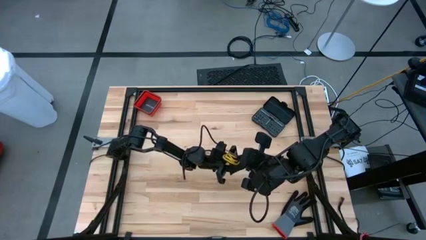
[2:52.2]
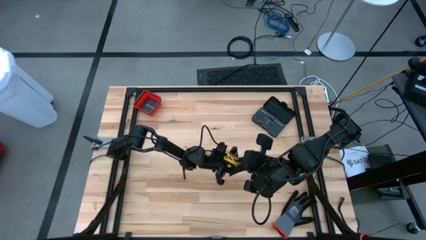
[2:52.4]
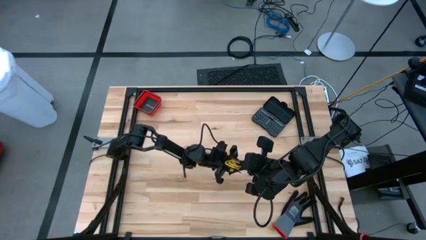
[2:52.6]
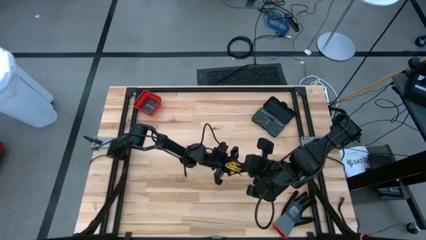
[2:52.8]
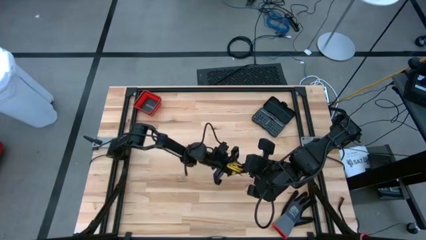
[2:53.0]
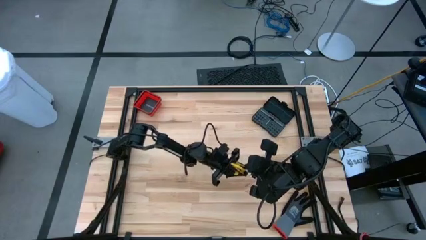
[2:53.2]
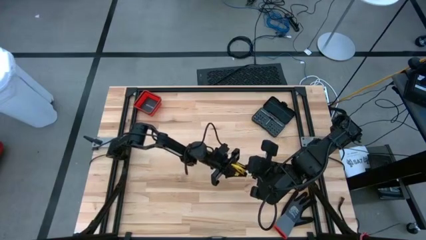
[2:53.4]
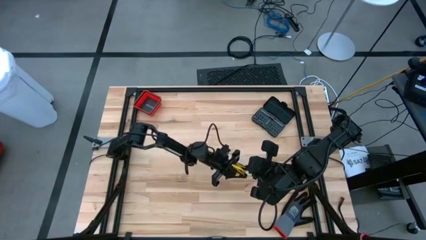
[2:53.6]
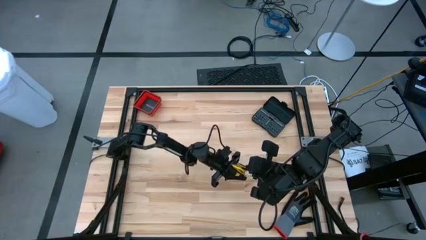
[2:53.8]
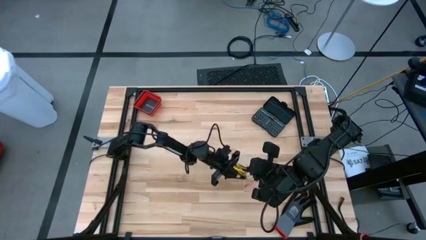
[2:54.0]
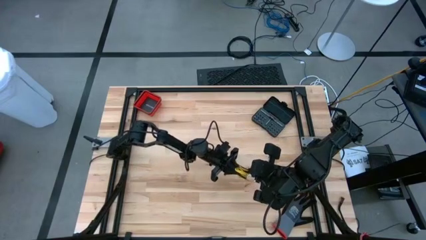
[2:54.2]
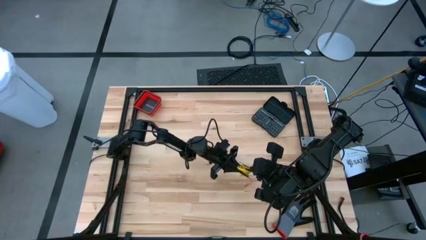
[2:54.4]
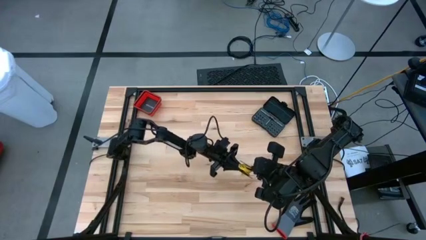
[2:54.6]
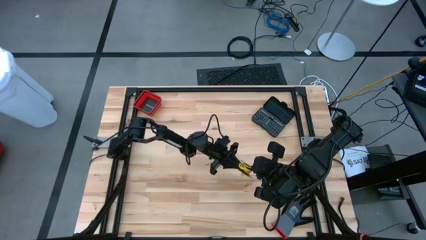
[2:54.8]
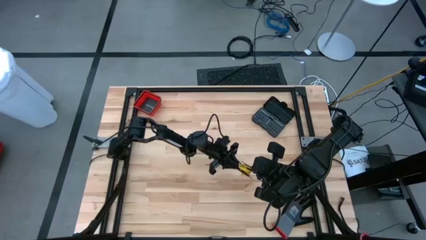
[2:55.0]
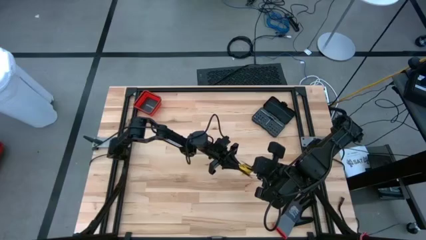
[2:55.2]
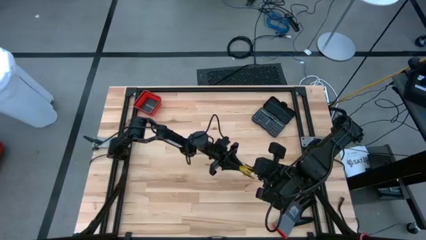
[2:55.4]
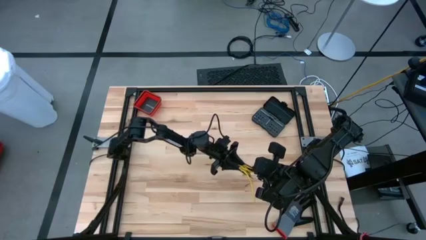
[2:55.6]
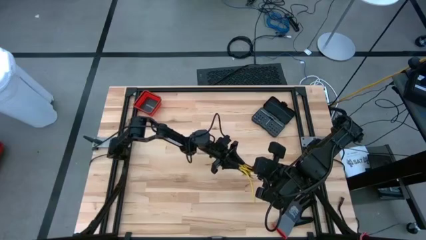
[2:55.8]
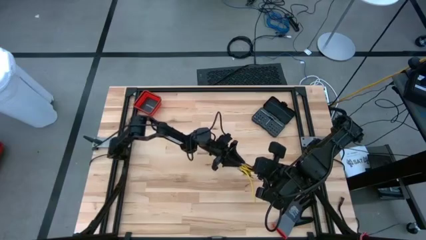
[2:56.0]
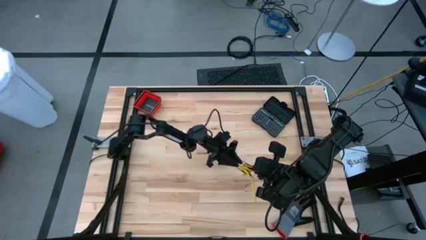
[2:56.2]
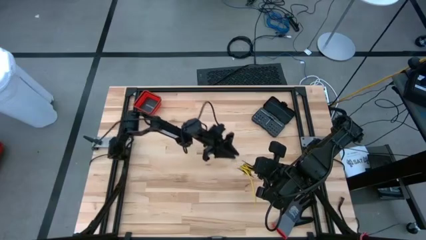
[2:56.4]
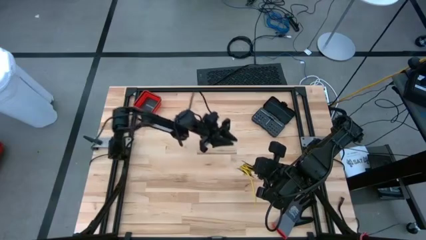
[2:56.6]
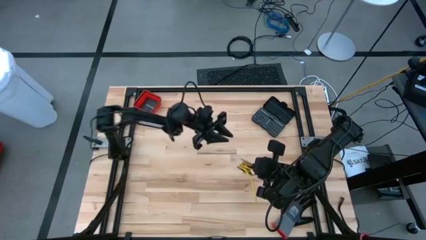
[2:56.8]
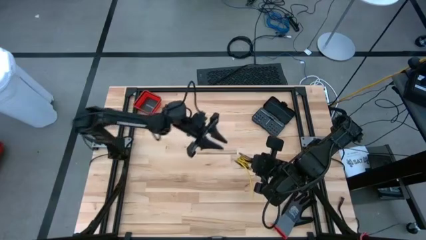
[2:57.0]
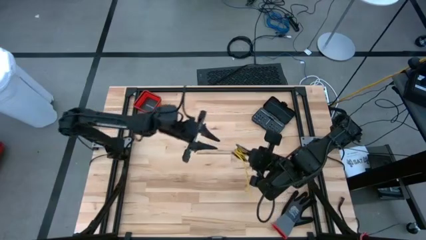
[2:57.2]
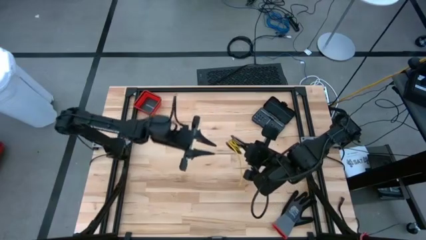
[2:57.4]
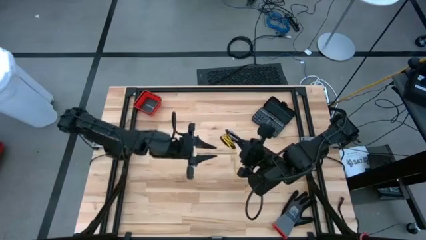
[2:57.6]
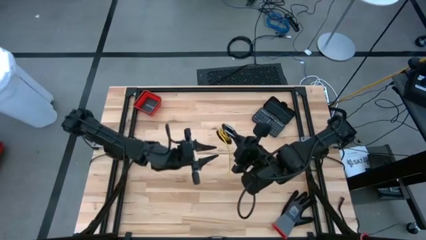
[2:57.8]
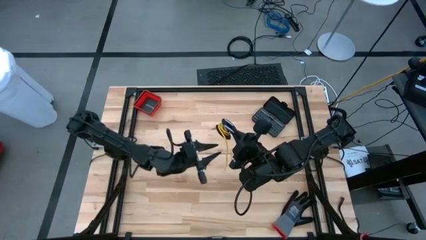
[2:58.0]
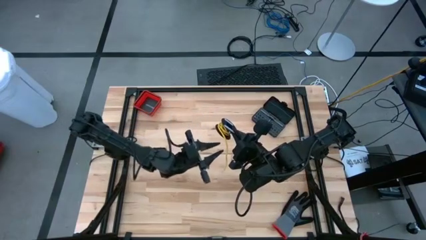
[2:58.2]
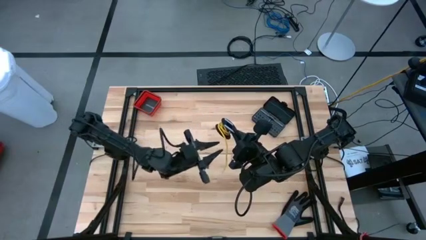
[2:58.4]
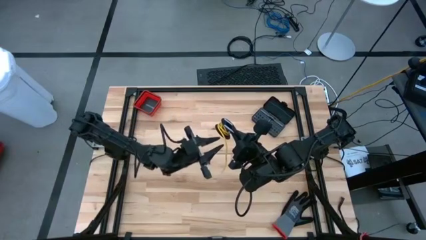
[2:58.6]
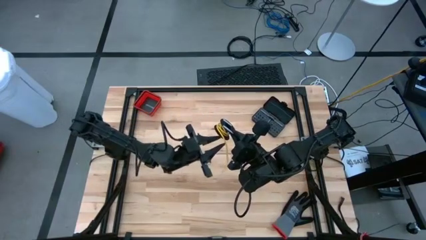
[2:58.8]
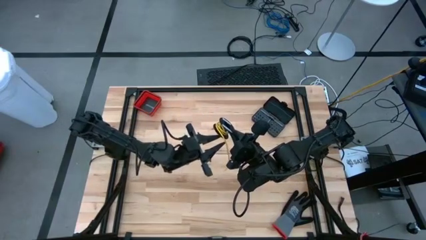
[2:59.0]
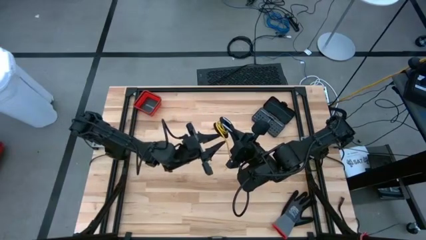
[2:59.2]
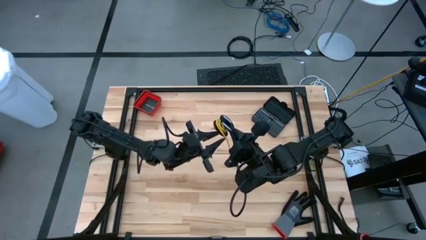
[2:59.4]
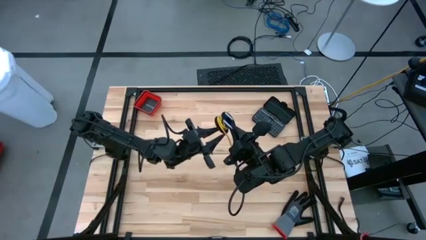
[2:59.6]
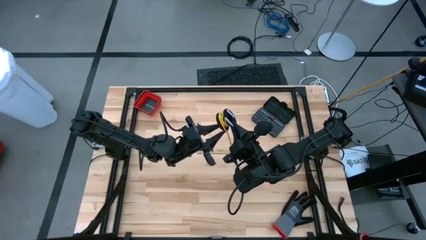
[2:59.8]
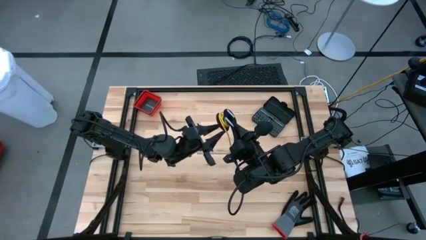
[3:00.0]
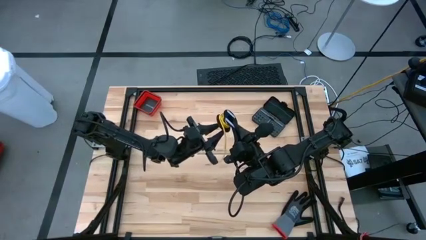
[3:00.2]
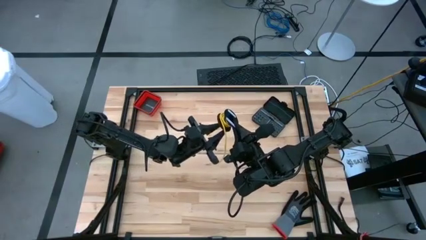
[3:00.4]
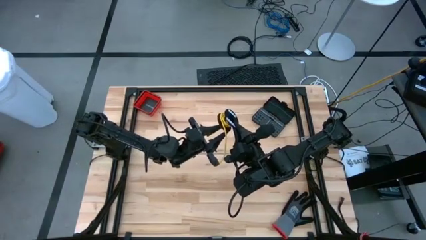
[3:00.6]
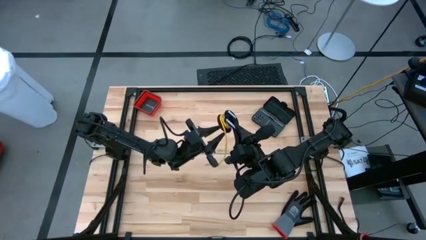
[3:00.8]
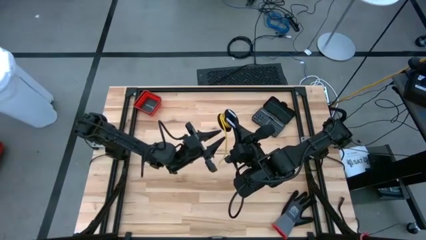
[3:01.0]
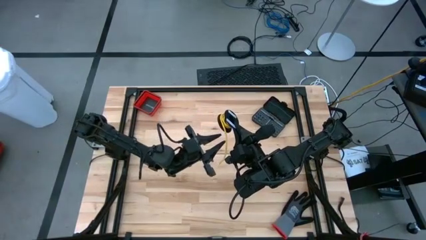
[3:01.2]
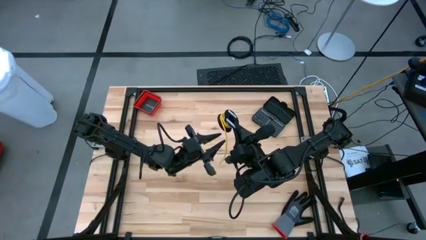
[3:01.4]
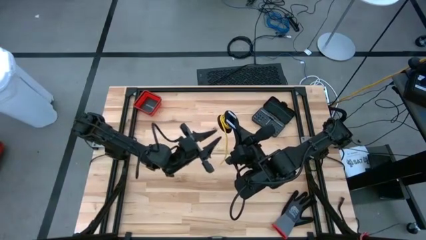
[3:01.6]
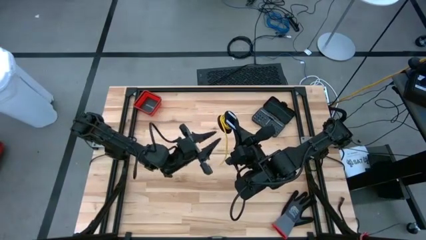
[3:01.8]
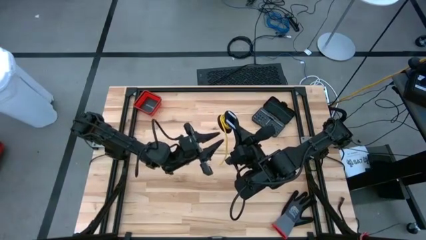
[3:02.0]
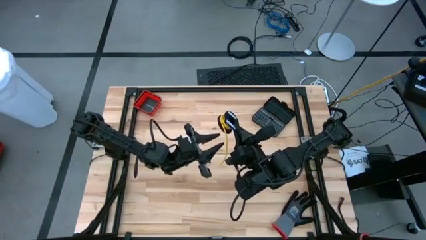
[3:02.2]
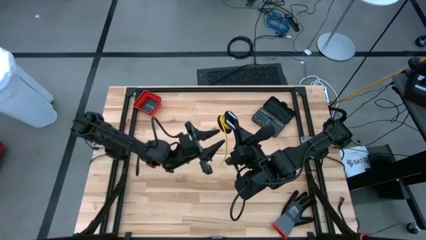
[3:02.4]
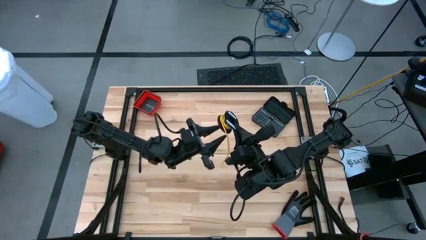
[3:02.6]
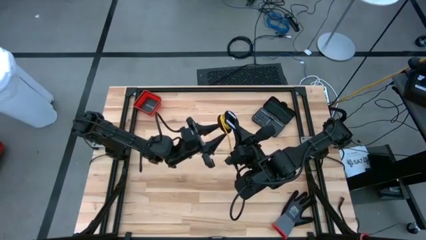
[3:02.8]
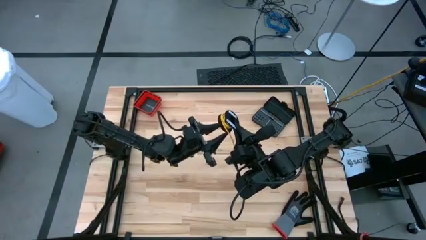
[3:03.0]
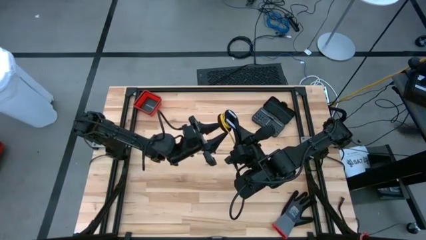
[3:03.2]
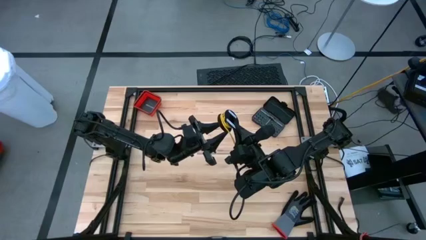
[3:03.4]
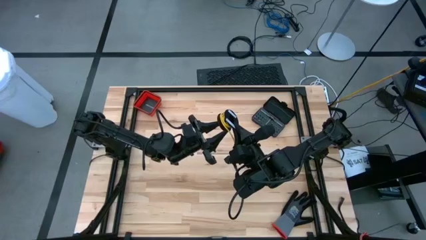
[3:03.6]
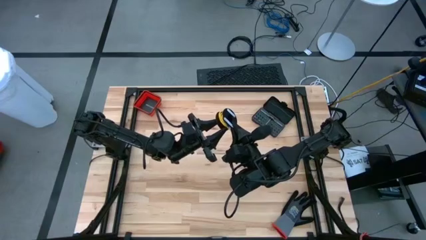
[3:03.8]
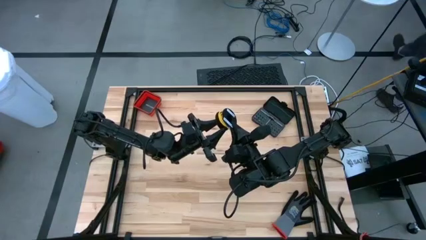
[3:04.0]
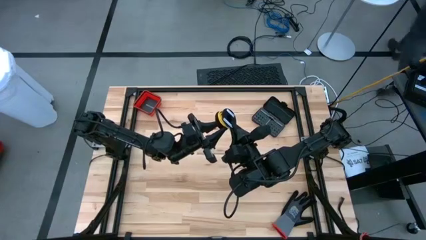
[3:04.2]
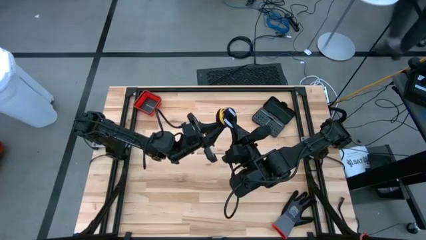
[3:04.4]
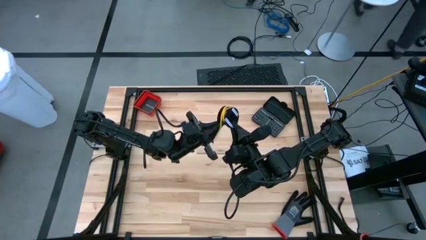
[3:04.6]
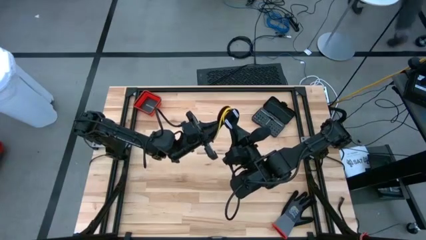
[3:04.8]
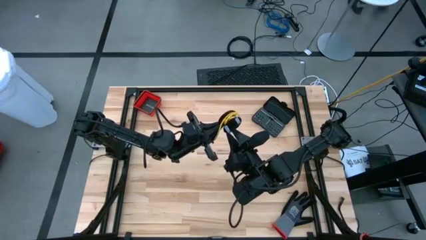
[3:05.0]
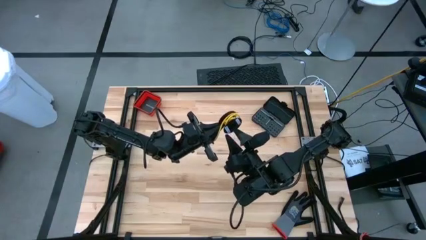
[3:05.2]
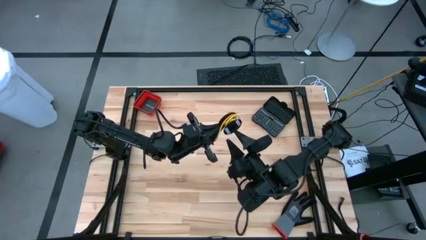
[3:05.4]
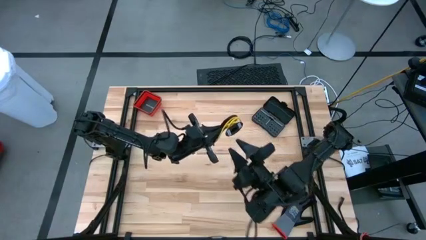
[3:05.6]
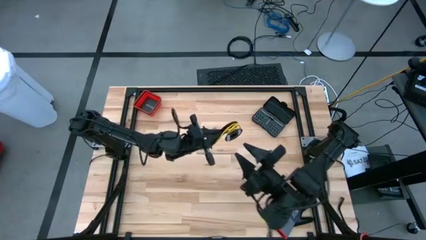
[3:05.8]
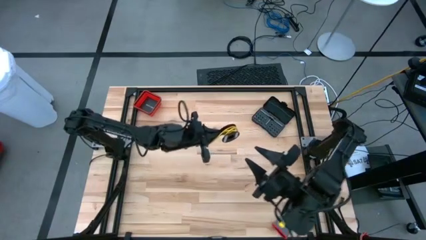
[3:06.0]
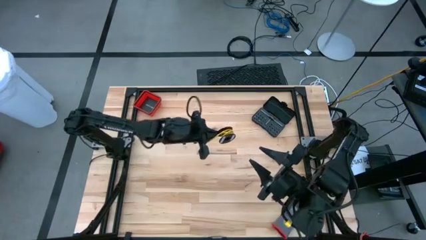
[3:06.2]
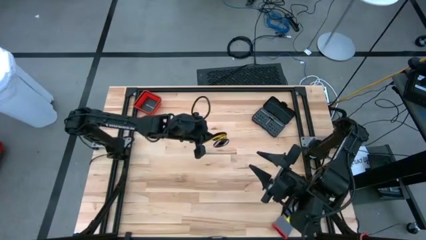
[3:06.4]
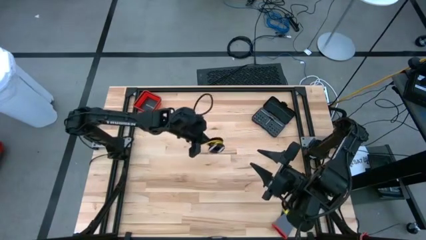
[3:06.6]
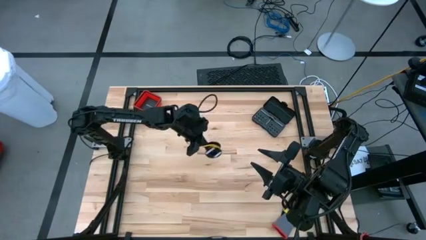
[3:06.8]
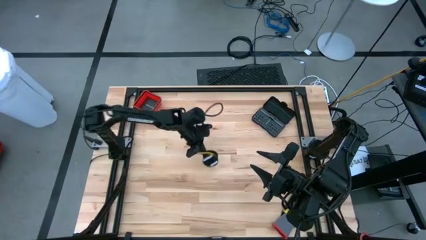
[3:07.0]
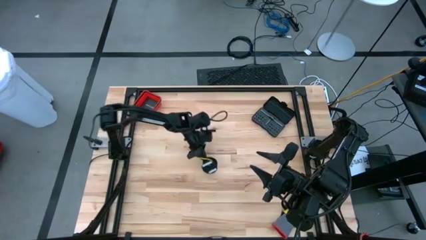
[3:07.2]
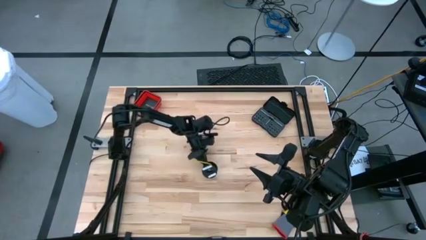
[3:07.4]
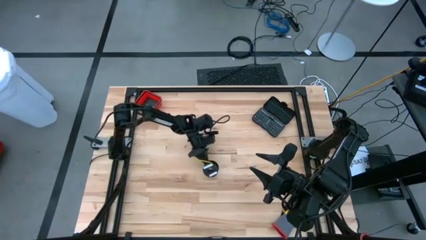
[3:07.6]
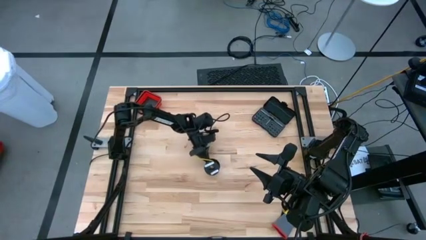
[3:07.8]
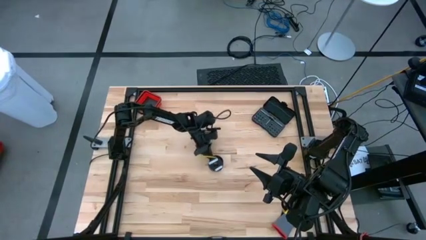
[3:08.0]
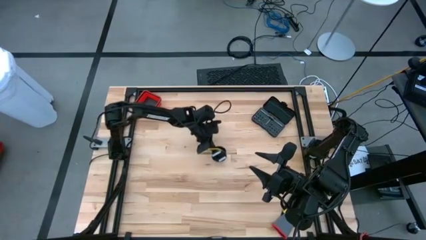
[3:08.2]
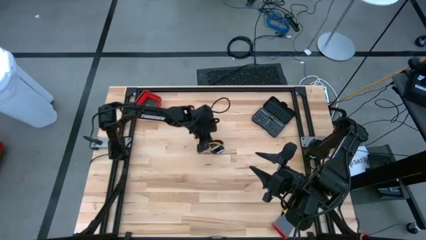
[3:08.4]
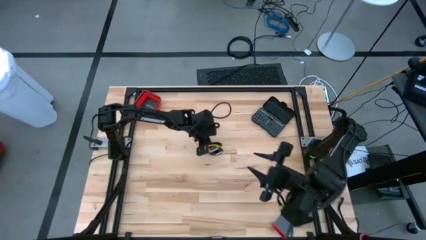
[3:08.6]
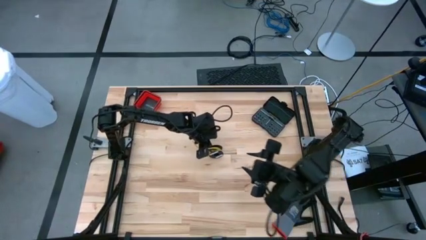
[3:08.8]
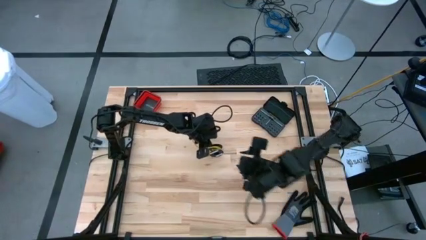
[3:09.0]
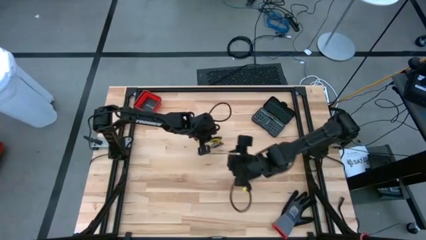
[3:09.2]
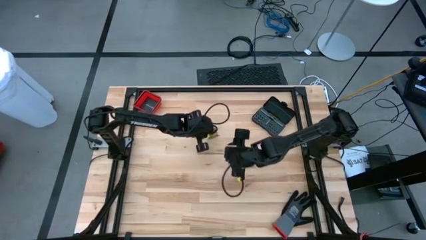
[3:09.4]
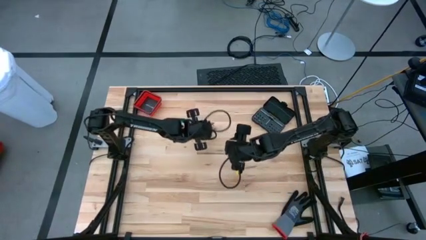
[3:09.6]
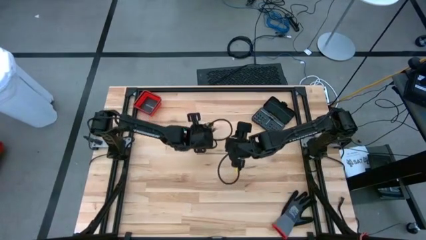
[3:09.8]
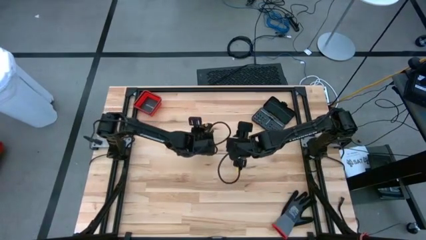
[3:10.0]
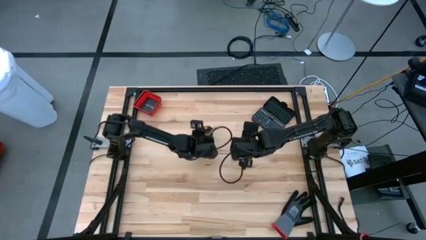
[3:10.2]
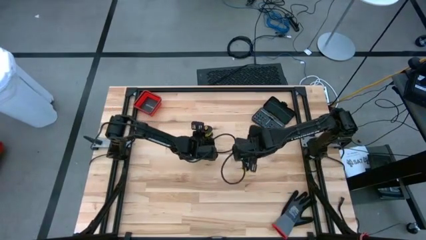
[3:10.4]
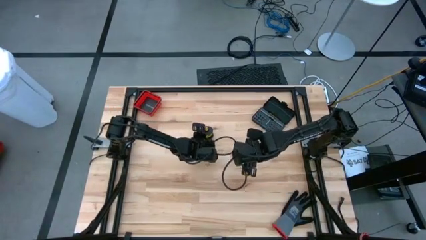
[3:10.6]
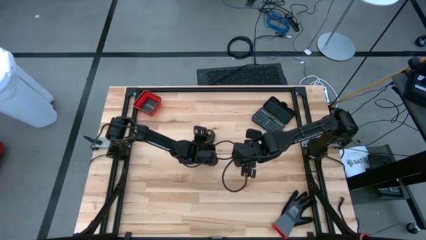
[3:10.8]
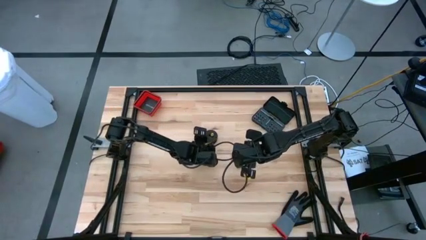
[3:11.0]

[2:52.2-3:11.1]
Task: Coil cords
Coil the yellow cable wire onto the spool
